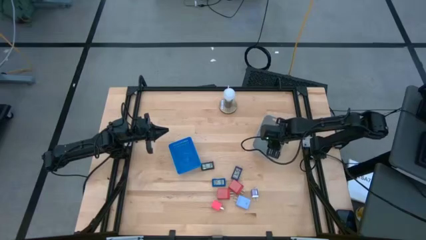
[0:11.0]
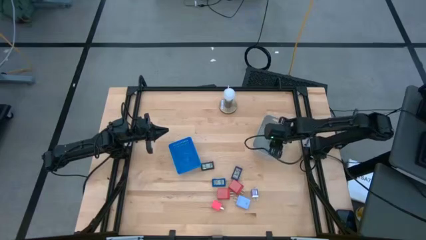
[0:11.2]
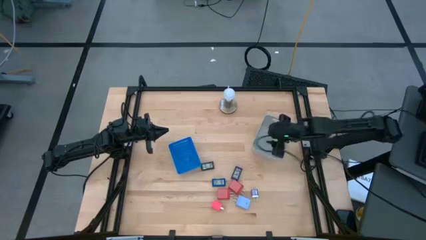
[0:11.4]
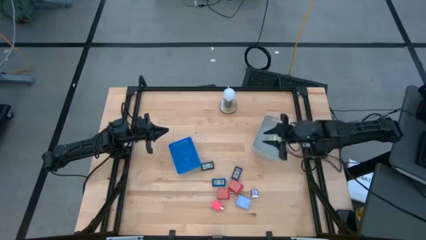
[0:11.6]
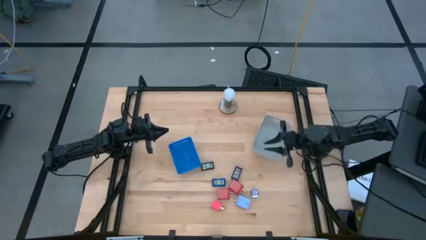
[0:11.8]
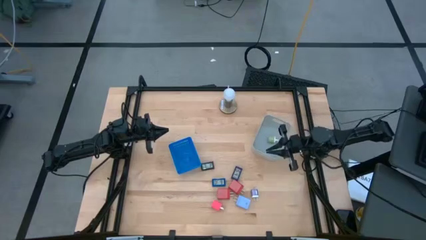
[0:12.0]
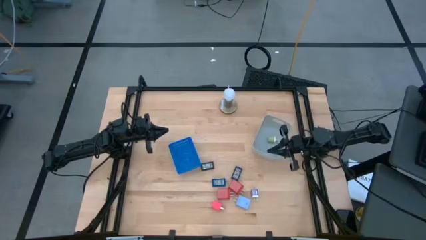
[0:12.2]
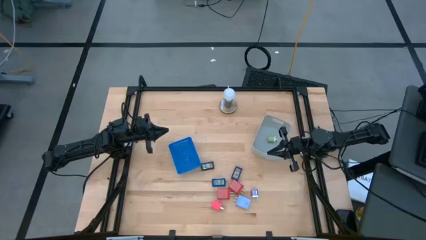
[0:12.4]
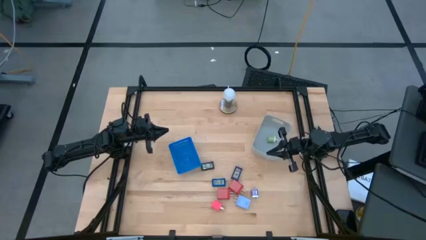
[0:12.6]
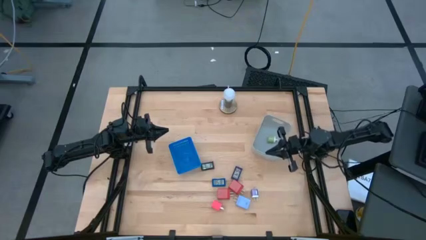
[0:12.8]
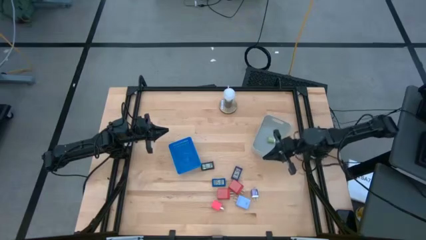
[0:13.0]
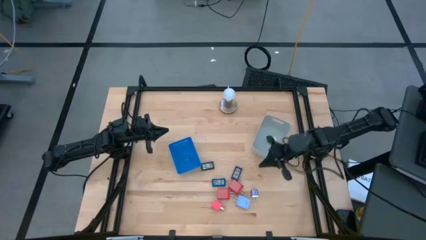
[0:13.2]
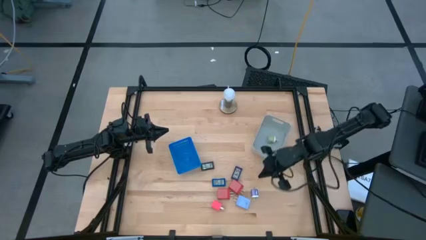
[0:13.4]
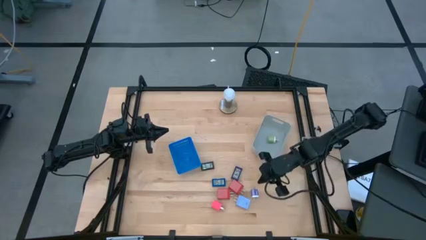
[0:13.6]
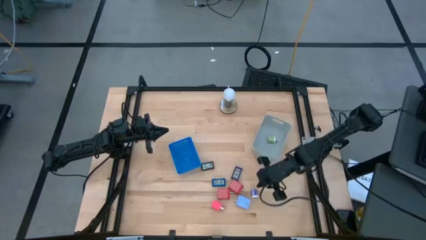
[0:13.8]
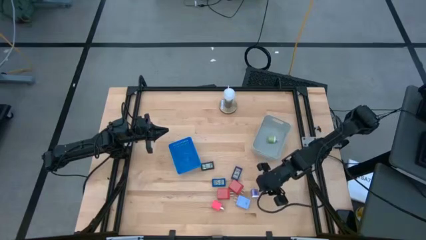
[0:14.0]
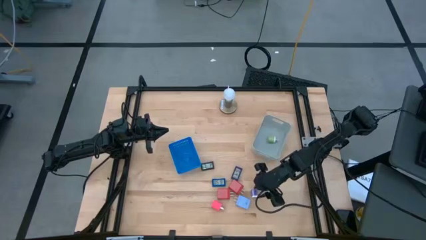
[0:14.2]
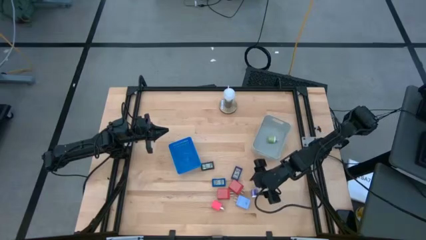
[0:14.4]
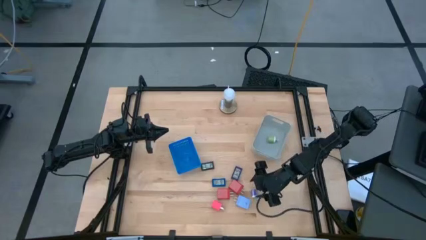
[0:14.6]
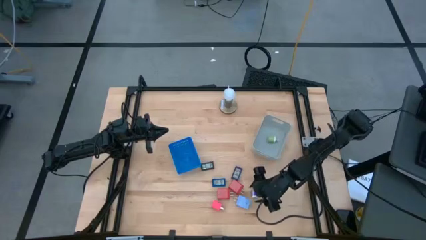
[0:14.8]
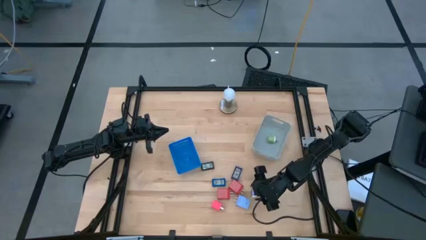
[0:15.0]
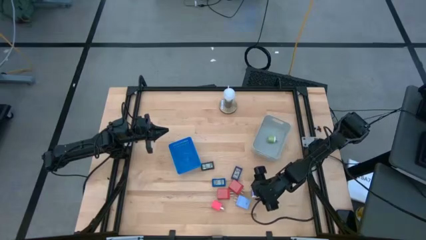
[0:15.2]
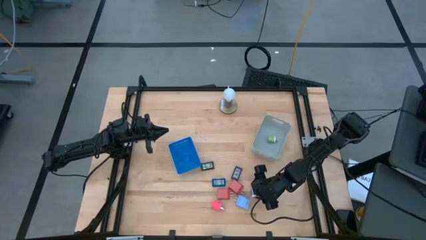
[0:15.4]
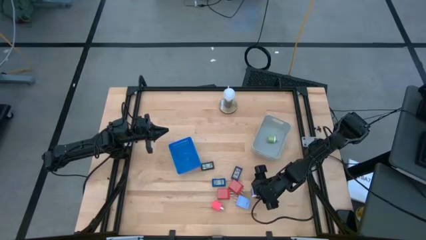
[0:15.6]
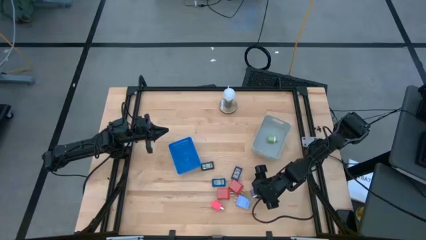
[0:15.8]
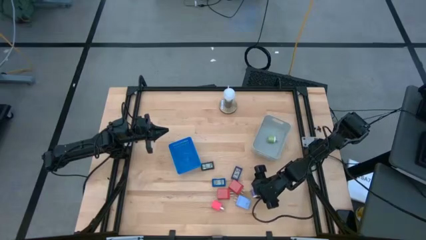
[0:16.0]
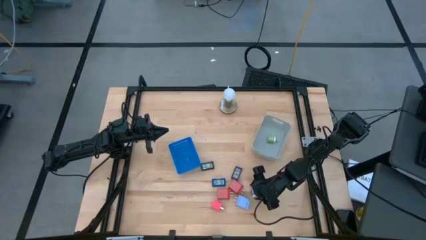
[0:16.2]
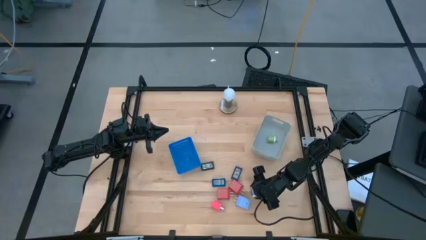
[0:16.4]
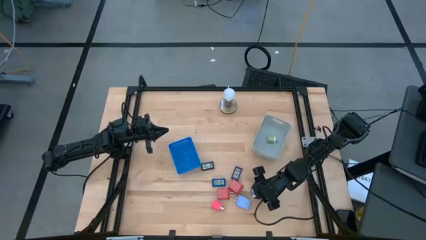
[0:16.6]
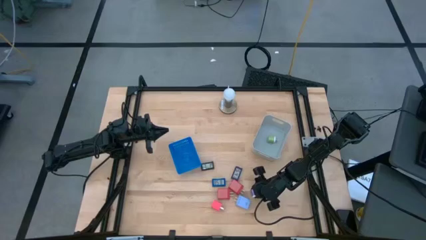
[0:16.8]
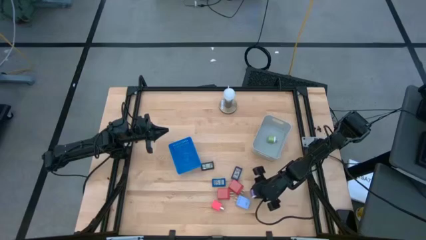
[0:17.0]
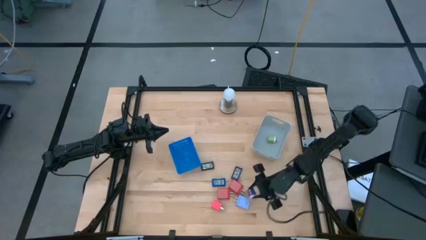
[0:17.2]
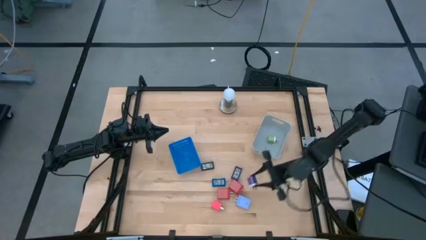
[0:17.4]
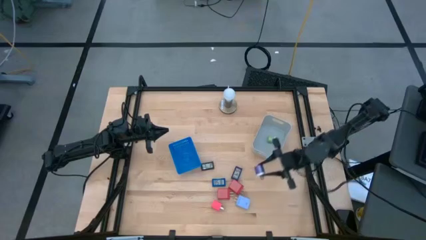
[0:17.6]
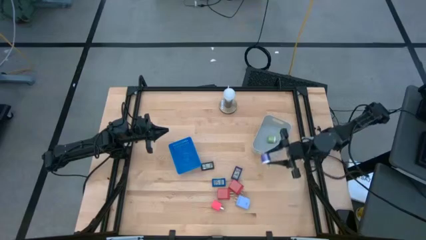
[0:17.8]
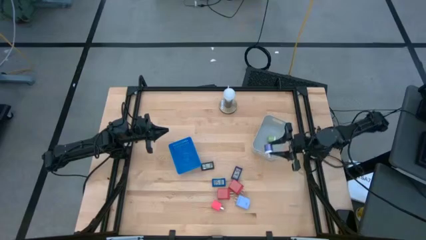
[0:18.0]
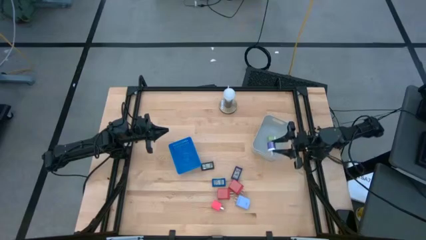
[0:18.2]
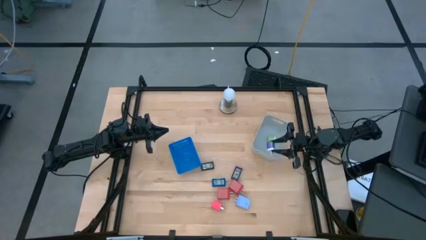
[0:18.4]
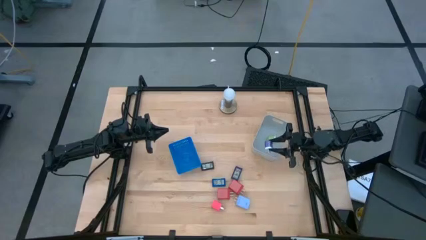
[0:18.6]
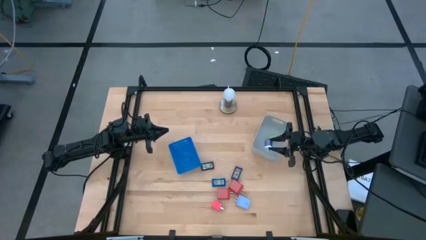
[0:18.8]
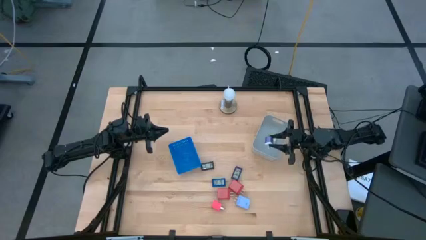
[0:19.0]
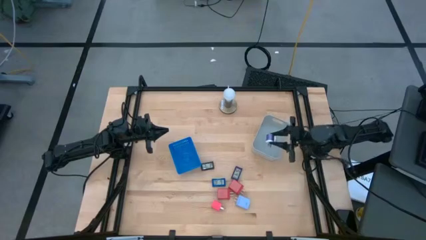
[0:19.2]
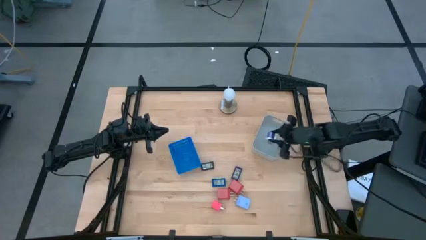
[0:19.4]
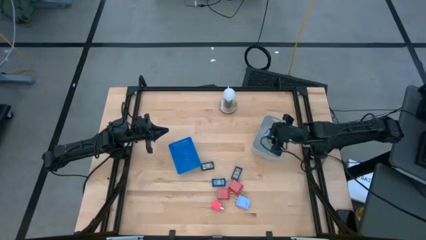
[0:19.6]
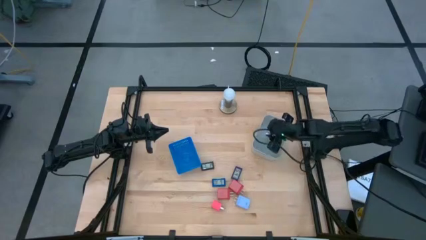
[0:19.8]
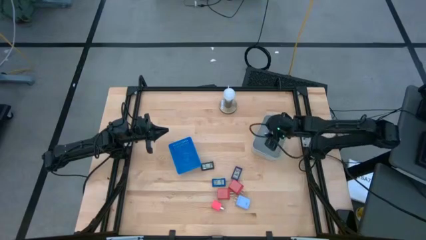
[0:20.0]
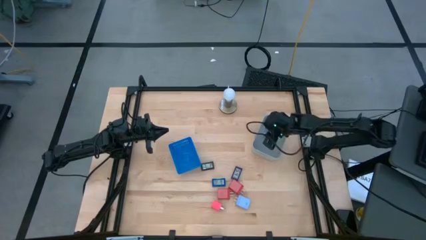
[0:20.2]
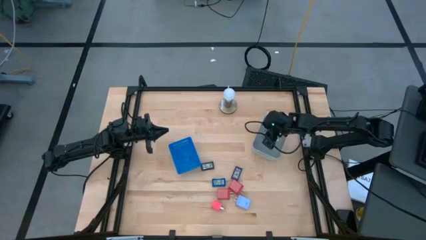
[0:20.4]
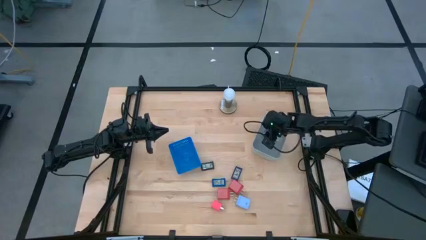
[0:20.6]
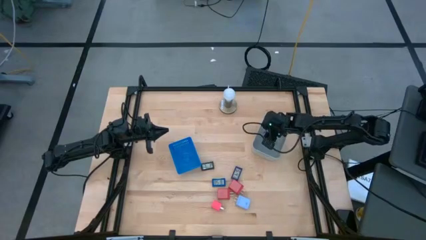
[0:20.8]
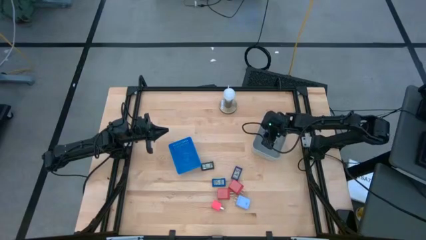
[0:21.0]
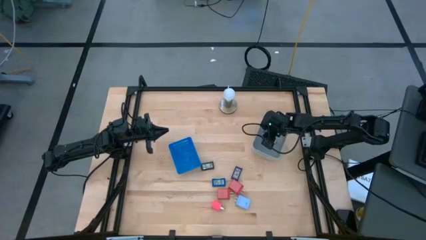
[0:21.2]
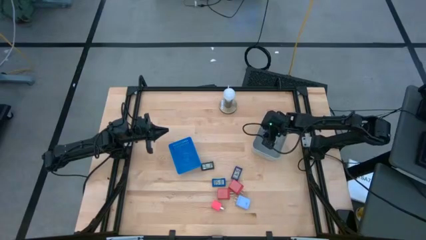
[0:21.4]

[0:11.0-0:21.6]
Task: Pick & Place Office items
Put the violet changer adapter into the gray bin

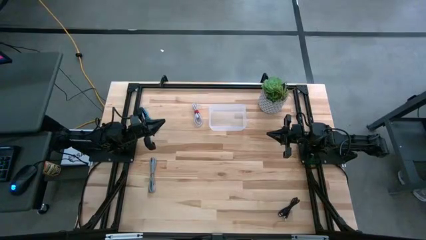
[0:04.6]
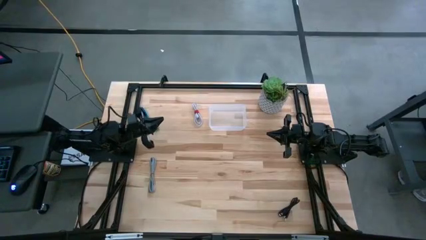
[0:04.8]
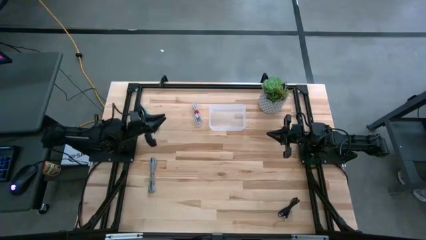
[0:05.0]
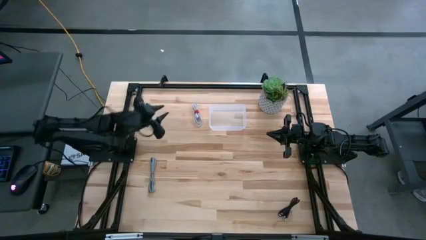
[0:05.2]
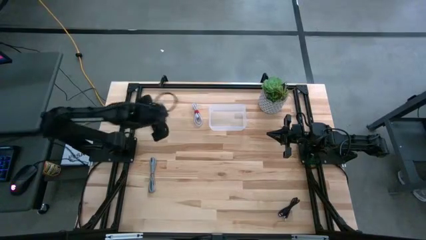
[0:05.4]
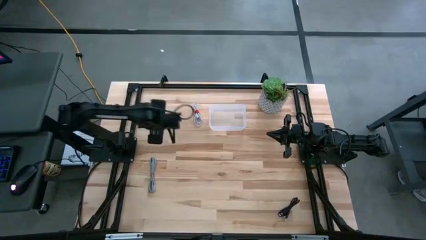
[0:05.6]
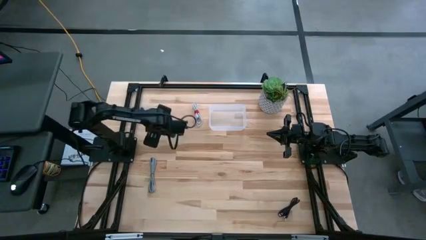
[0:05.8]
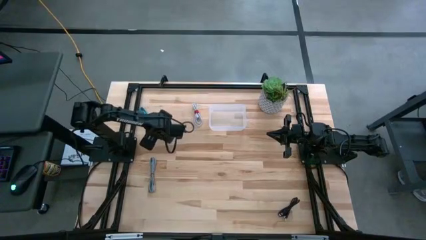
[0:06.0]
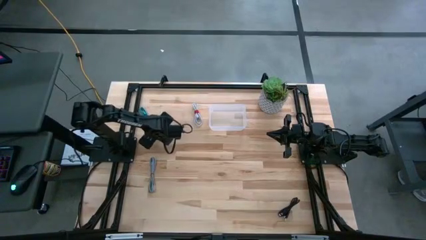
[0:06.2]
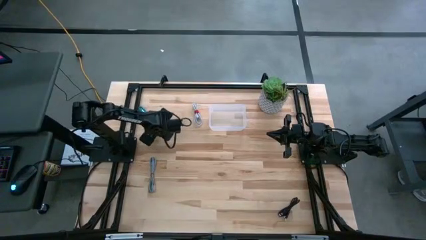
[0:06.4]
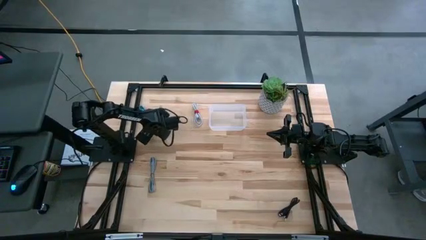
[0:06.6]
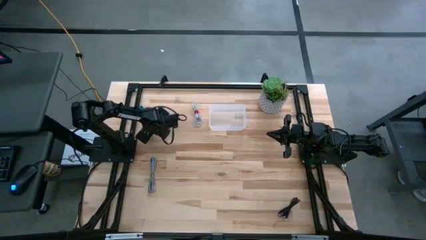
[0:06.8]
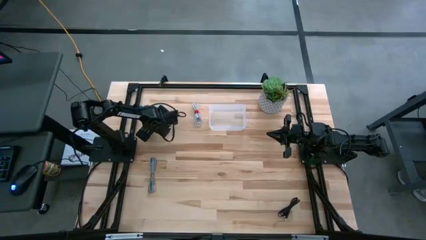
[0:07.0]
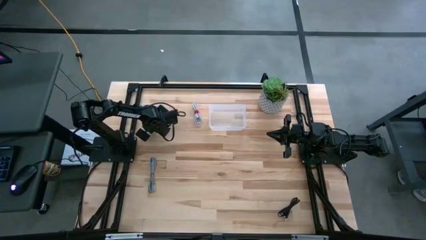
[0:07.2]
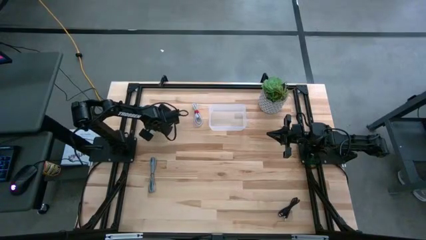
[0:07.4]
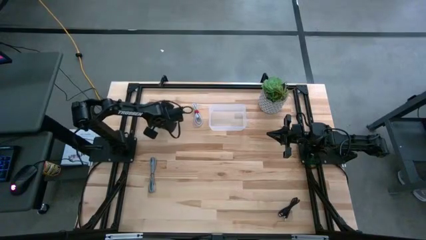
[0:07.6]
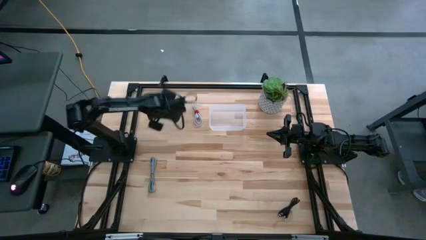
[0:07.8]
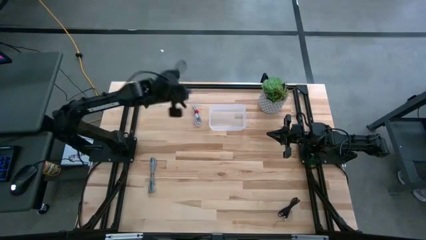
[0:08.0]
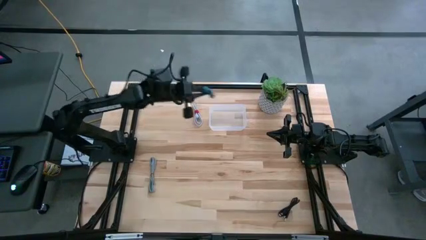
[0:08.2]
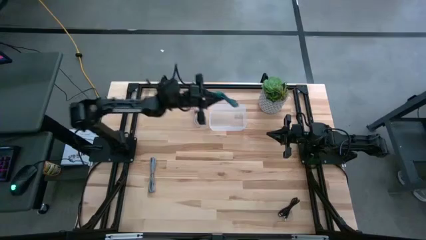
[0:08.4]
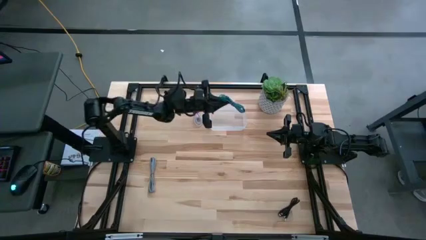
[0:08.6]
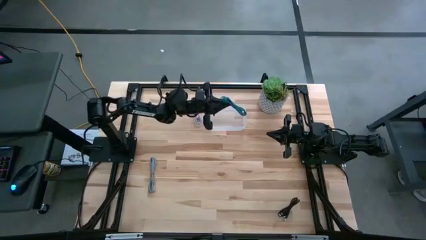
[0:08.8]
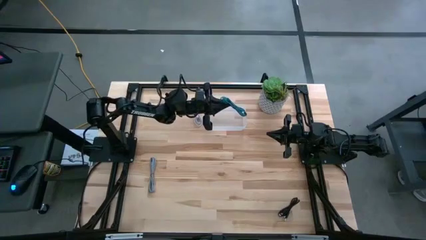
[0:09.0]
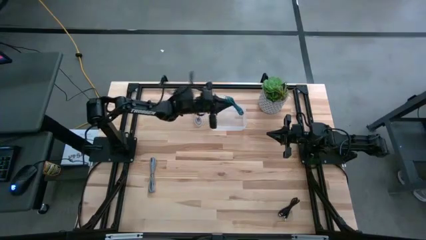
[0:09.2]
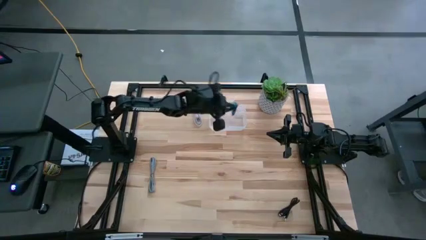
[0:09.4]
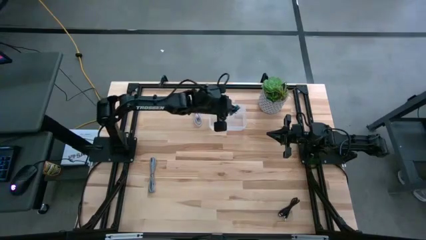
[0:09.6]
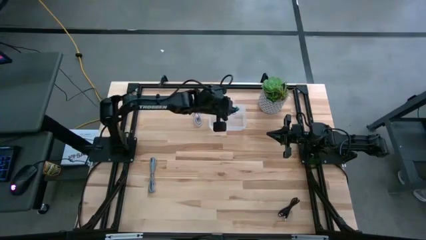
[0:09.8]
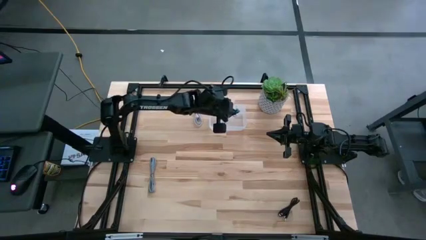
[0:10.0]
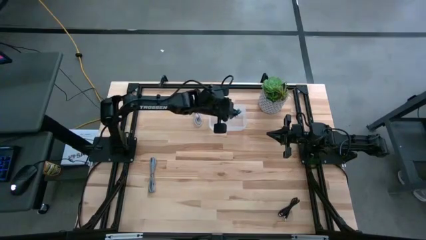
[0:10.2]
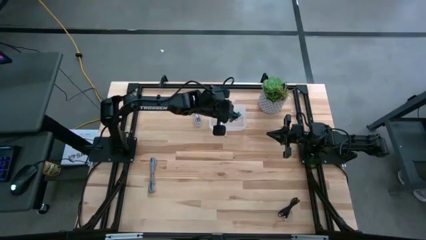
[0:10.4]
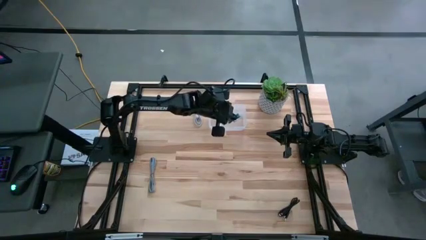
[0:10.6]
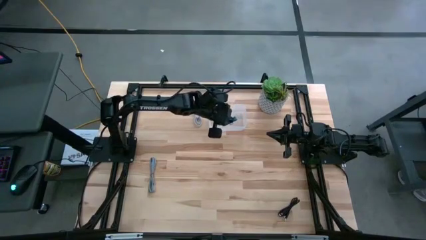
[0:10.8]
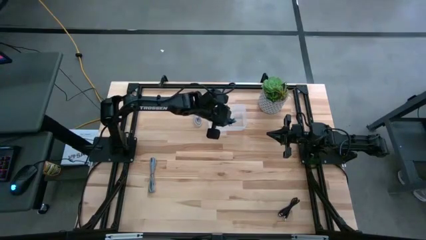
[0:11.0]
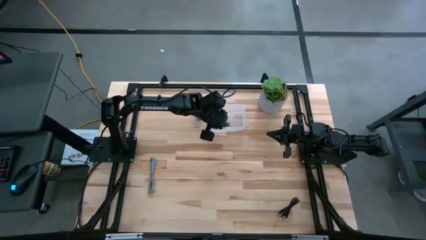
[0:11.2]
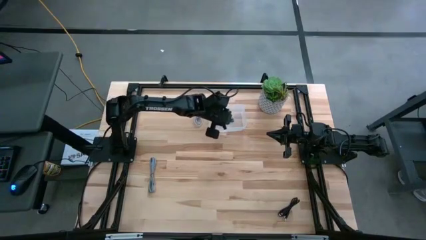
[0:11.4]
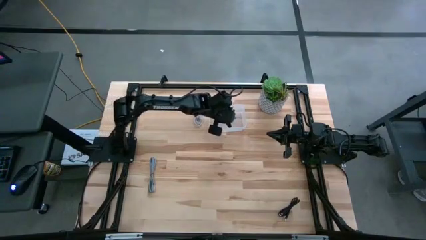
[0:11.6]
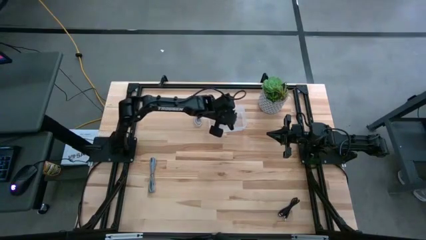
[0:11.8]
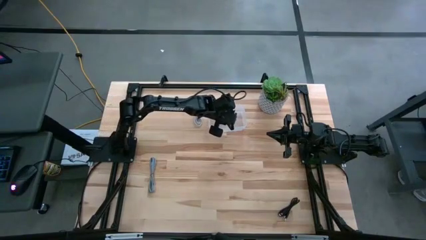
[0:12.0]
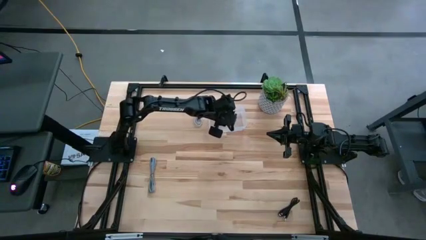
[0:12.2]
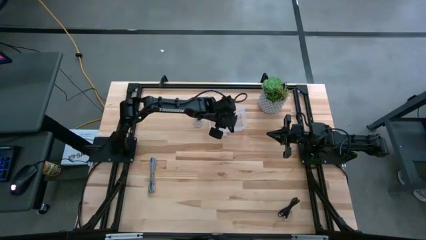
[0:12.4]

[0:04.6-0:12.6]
Task: Pick and place USB-C Cables
Put the blue charger cable into the transparent bin
